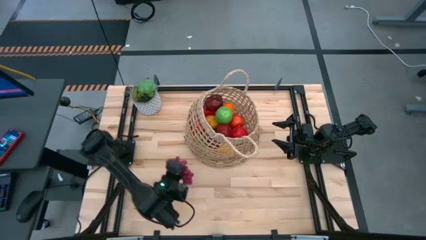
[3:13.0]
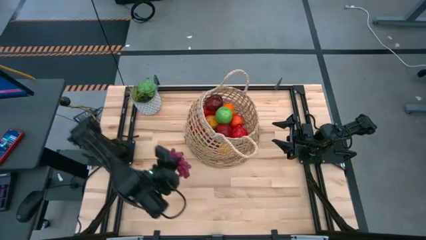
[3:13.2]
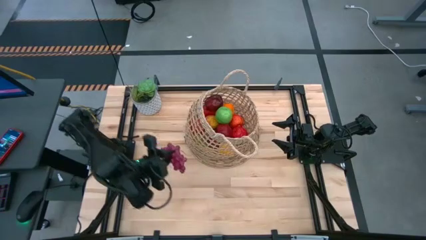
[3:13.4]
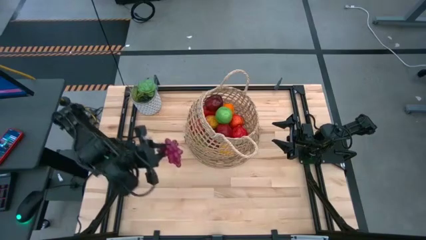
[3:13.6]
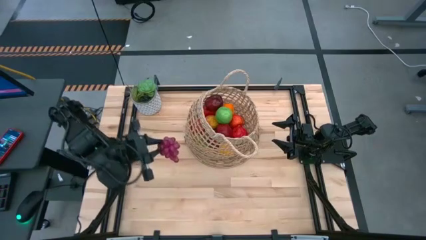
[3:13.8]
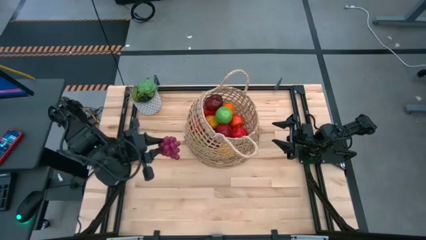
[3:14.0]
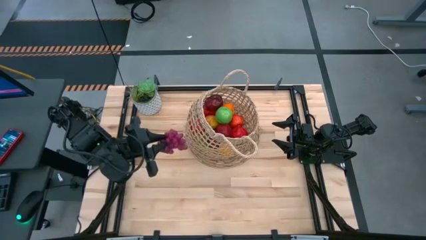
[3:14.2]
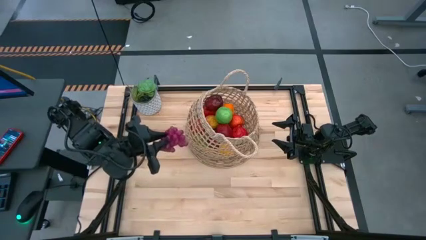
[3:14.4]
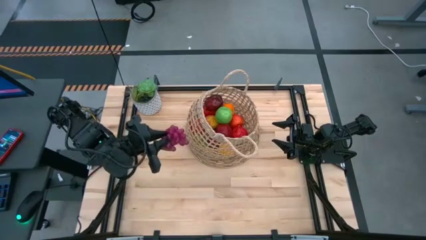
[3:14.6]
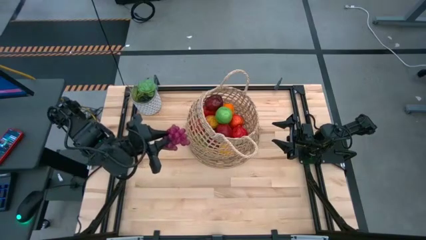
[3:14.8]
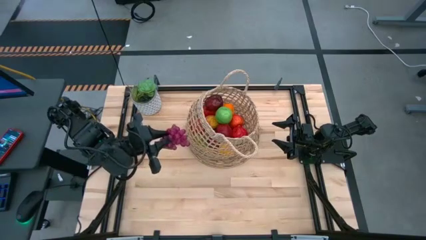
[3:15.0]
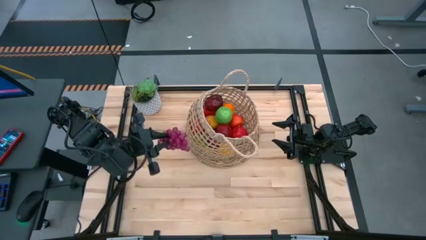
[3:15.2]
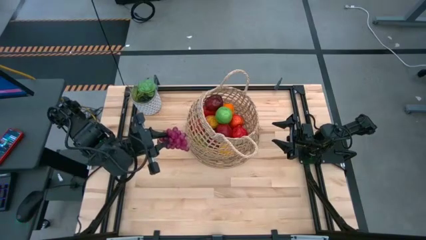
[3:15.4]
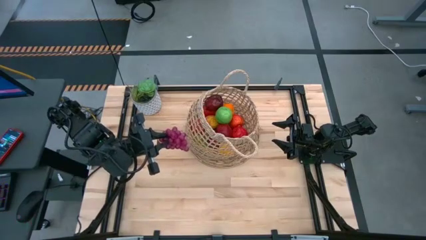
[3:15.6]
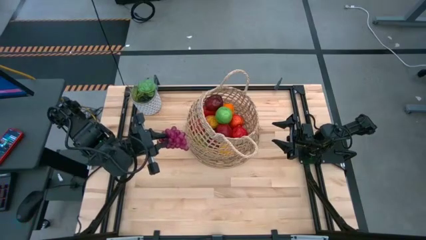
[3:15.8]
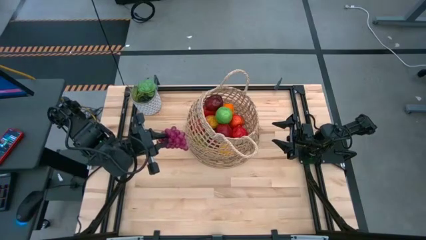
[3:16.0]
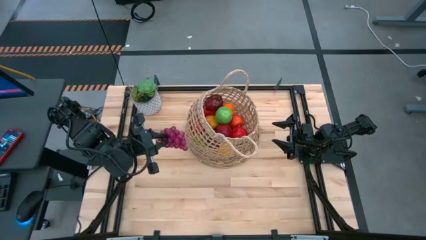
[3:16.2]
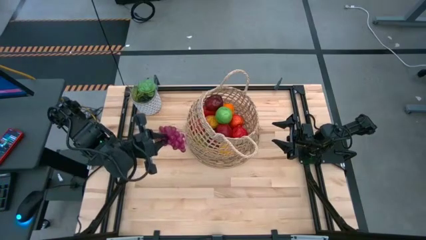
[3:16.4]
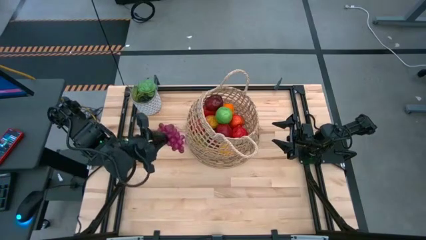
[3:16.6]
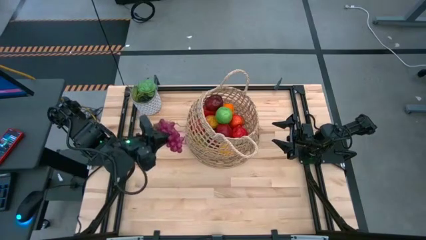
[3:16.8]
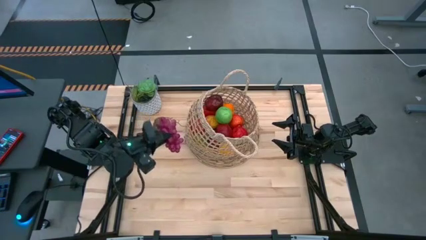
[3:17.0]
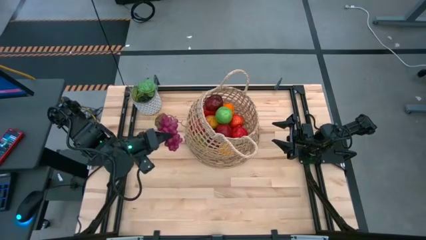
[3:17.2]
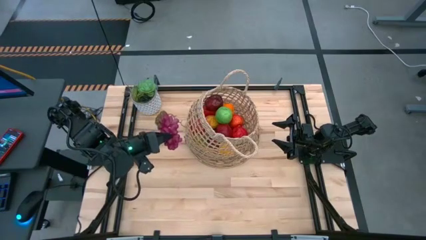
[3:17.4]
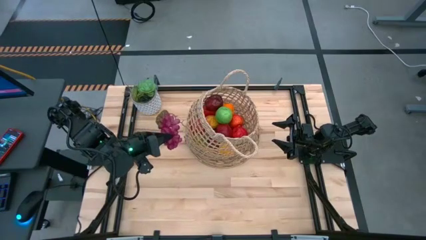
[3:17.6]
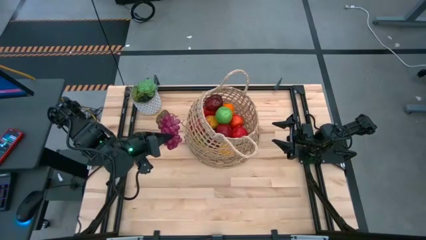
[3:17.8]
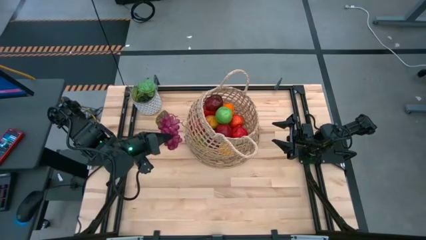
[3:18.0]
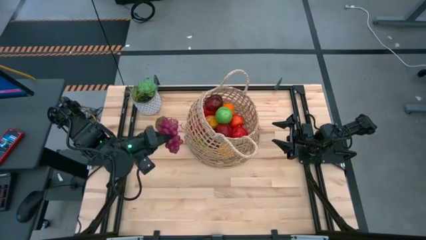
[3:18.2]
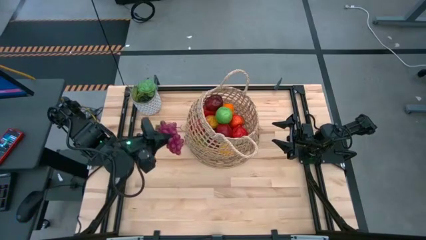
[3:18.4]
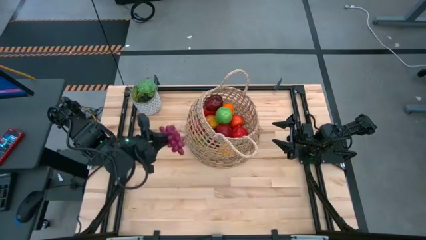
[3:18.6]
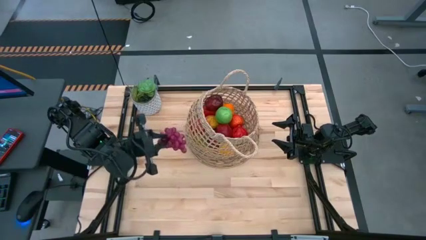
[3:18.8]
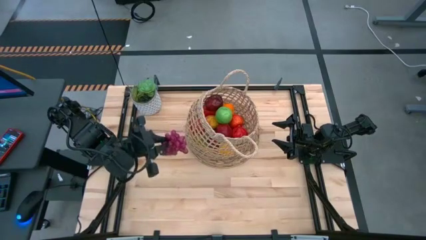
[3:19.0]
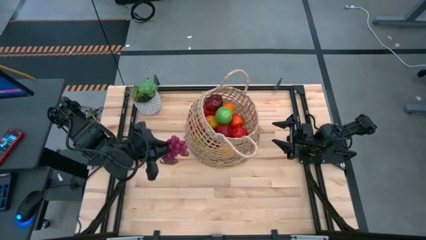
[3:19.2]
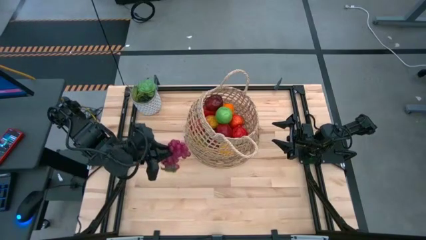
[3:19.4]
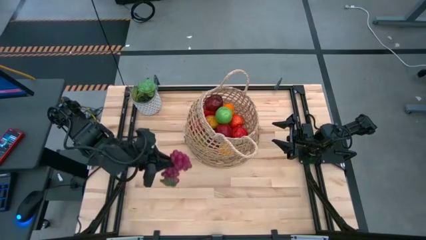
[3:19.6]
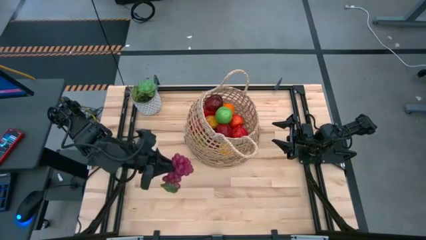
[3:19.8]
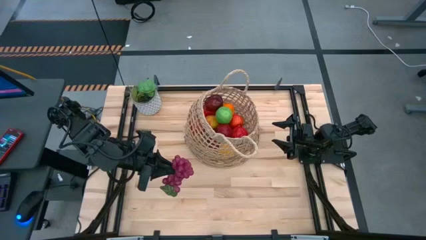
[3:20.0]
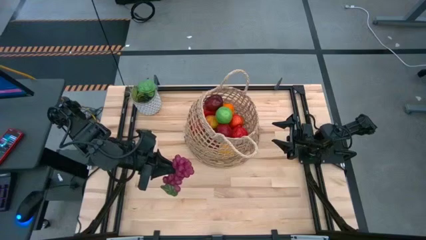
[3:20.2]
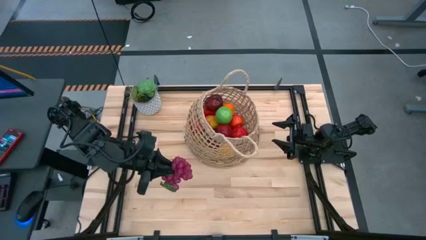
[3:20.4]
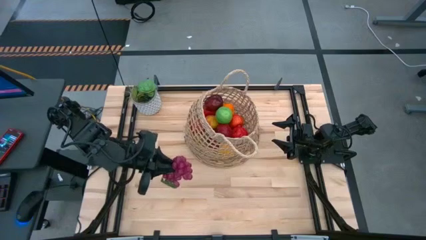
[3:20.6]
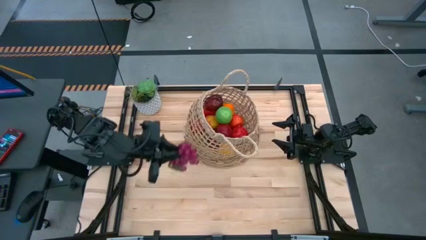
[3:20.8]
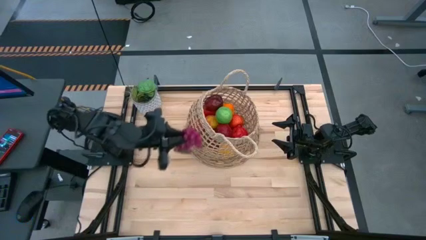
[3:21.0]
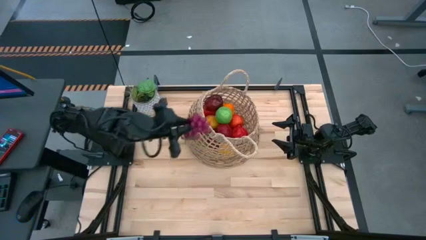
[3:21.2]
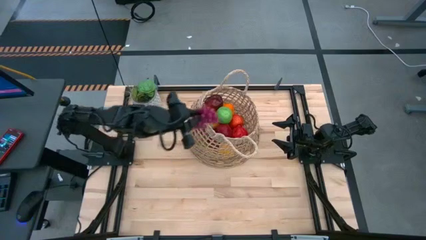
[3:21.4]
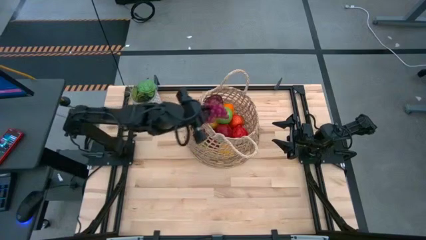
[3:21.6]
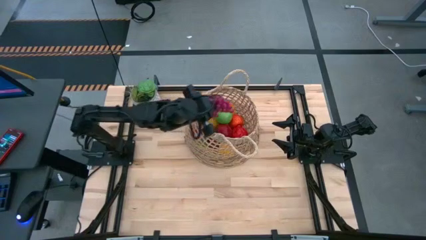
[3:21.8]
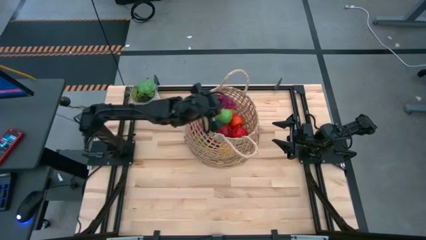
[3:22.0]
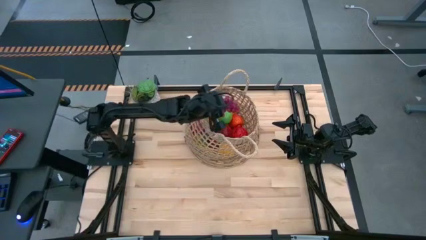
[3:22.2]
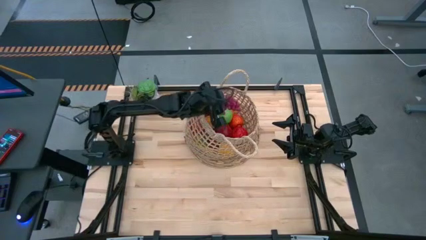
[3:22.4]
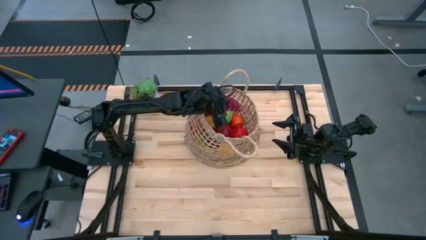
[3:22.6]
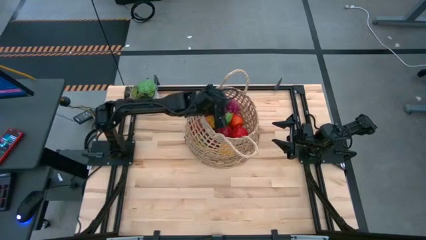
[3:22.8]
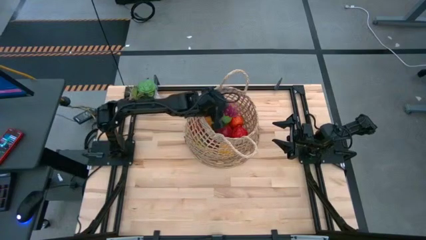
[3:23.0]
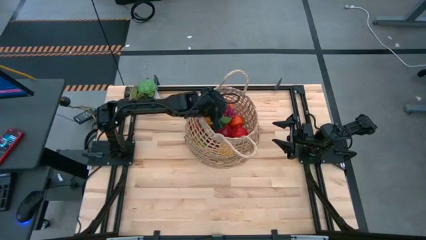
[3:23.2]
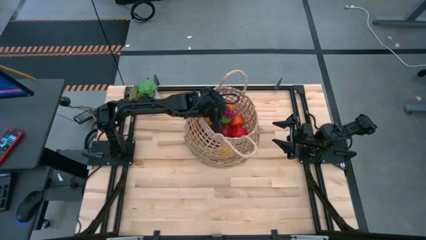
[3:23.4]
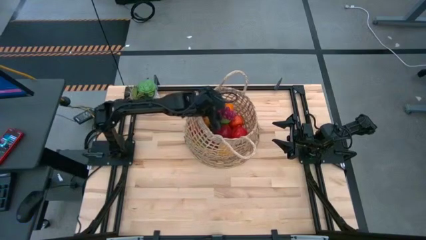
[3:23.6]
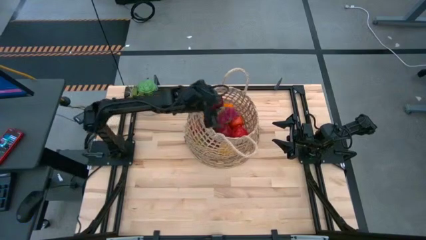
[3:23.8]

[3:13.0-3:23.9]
Task: Build produce basket
Put the red grapes into the brown basket

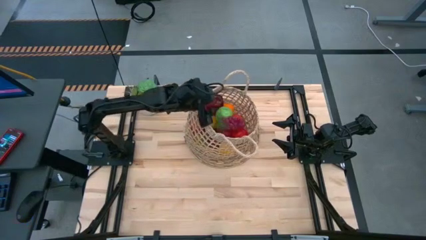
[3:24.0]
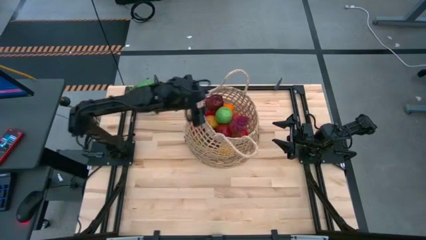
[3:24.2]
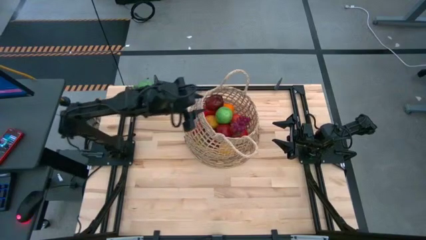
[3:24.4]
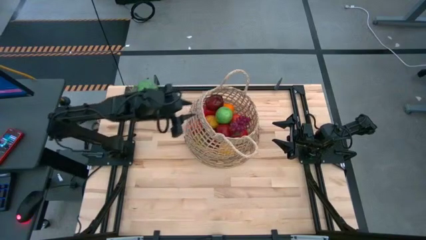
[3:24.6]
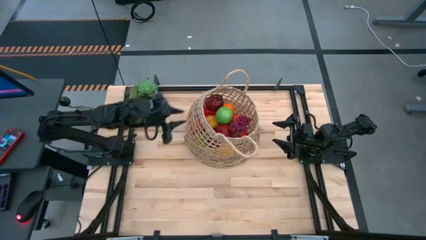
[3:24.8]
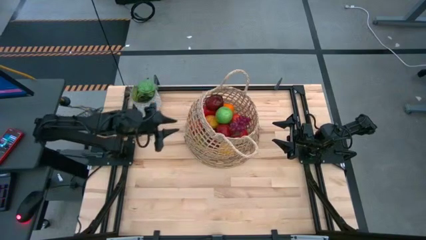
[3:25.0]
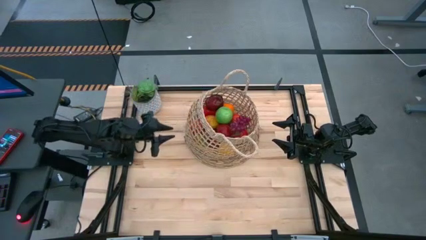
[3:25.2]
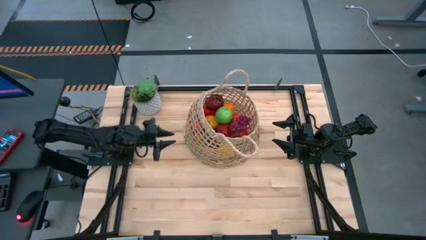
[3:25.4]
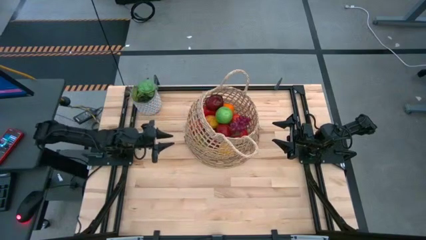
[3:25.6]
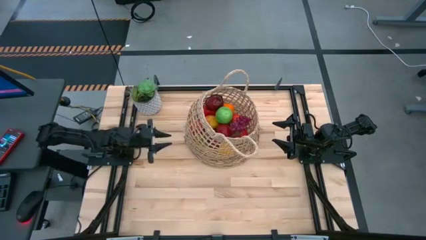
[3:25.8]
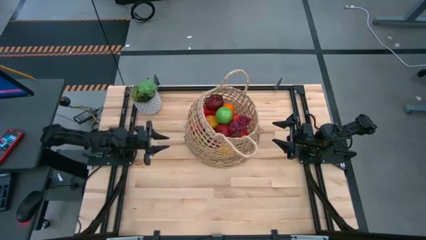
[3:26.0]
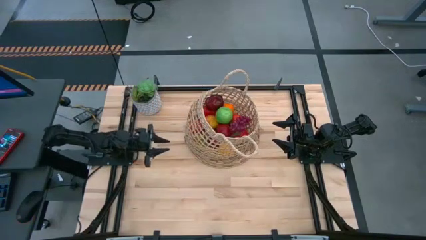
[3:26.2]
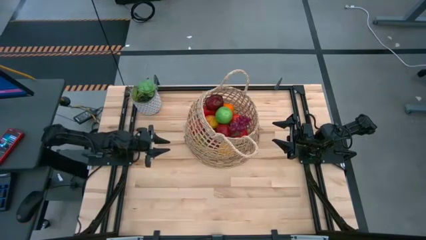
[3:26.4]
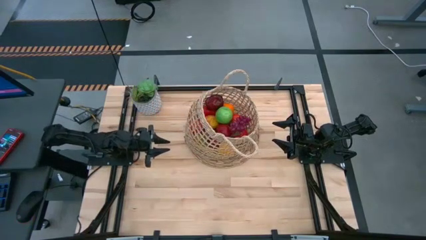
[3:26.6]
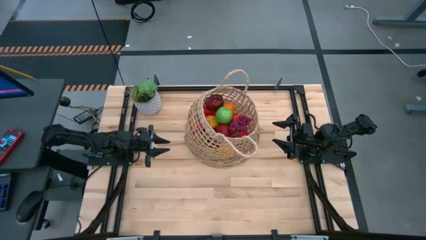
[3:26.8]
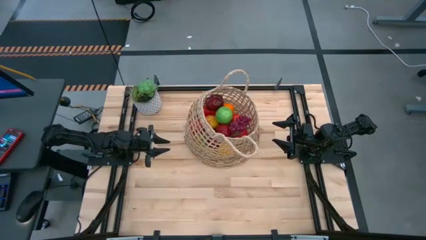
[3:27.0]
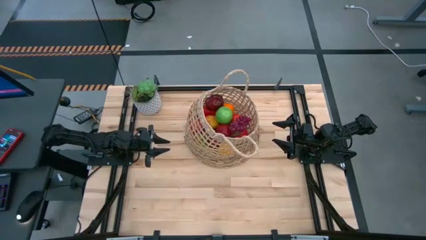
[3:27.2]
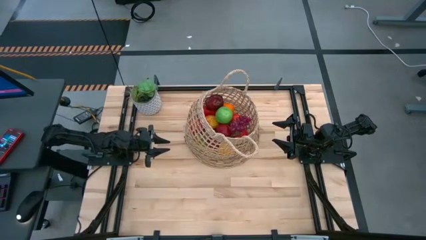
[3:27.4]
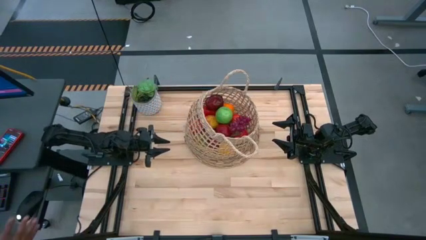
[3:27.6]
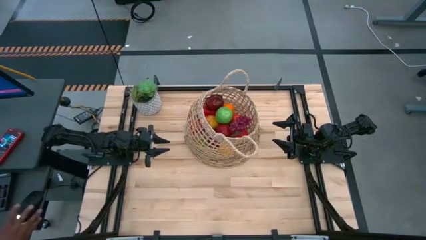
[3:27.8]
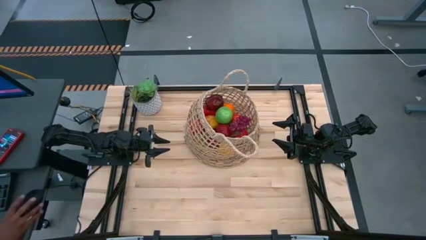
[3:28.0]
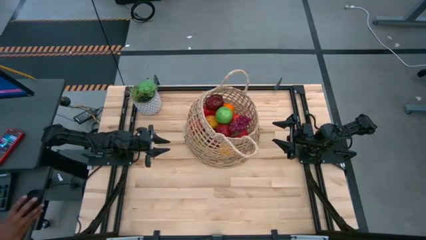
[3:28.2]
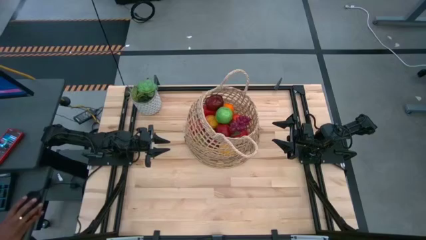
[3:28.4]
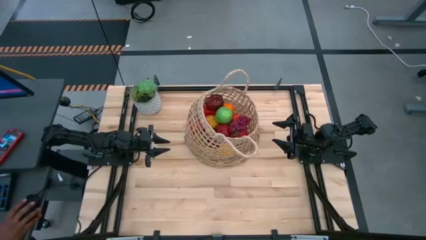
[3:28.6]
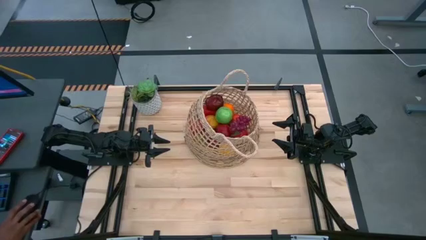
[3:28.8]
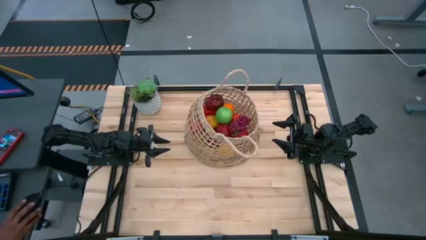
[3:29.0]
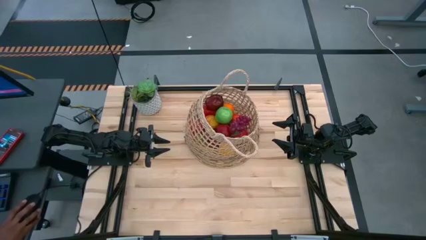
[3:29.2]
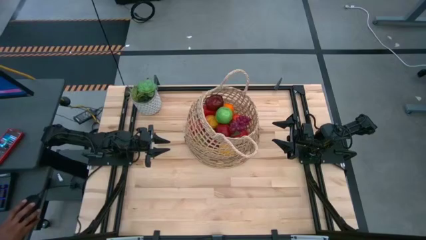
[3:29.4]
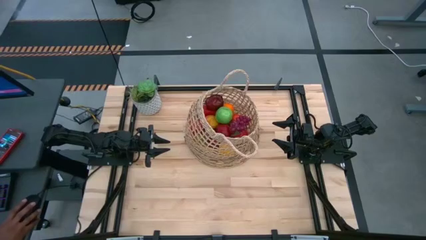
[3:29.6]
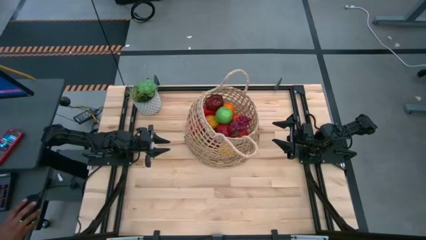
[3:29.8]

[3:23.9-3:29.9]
Return to Home Position
